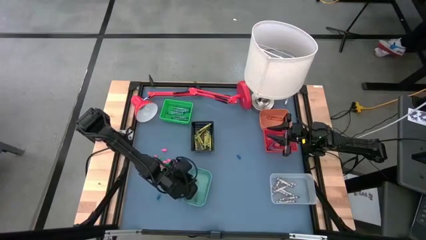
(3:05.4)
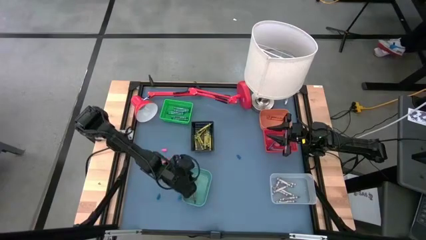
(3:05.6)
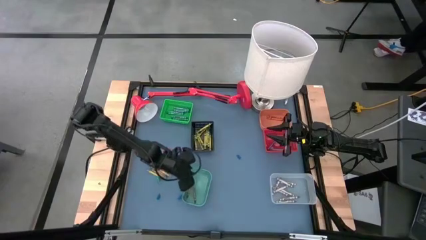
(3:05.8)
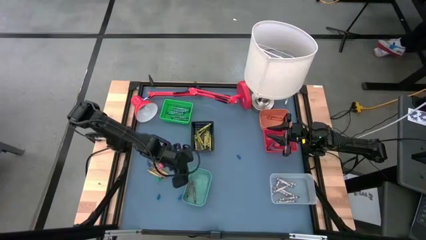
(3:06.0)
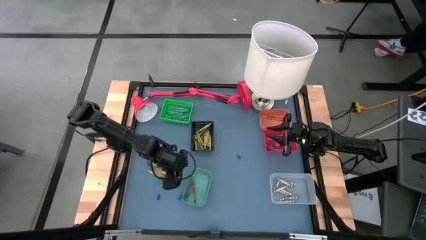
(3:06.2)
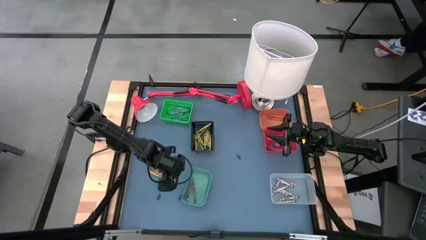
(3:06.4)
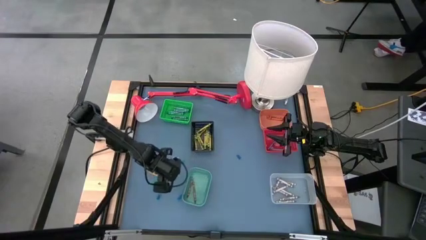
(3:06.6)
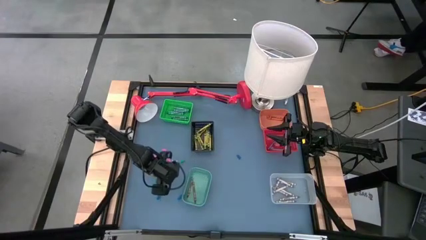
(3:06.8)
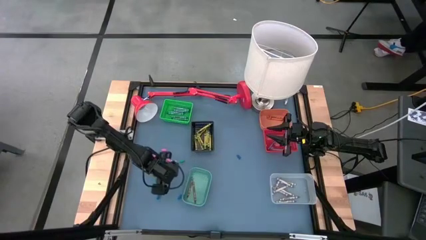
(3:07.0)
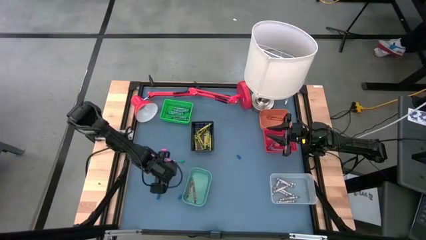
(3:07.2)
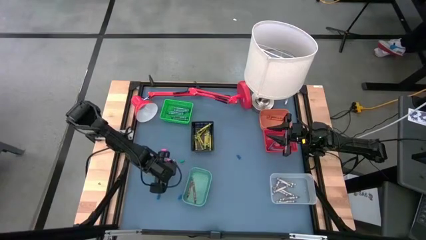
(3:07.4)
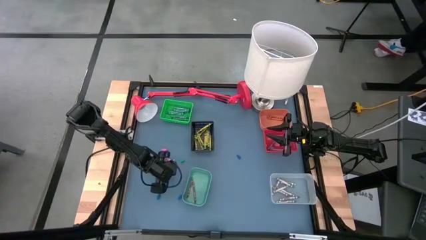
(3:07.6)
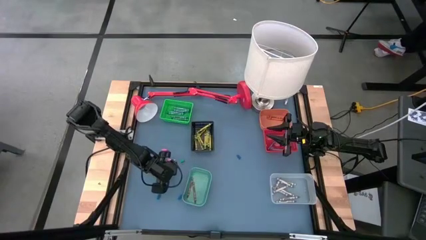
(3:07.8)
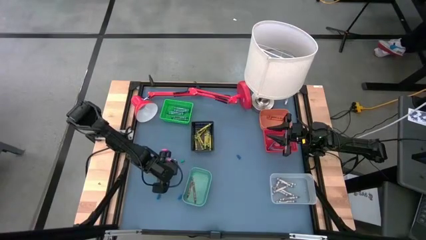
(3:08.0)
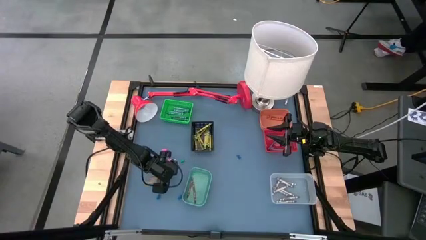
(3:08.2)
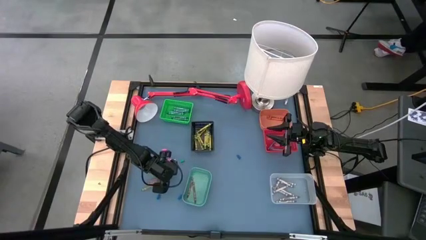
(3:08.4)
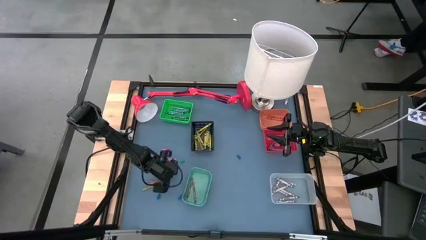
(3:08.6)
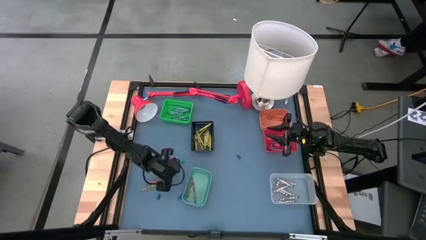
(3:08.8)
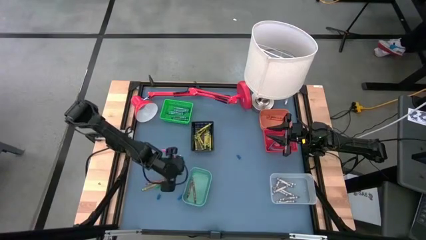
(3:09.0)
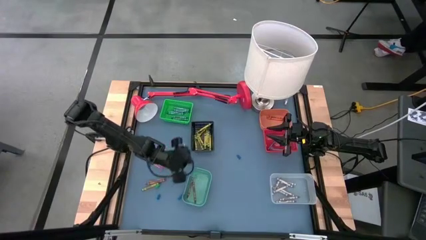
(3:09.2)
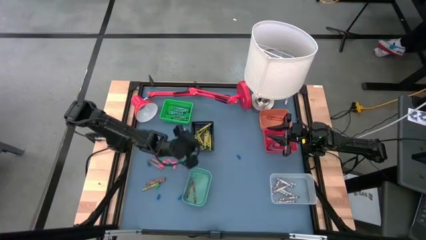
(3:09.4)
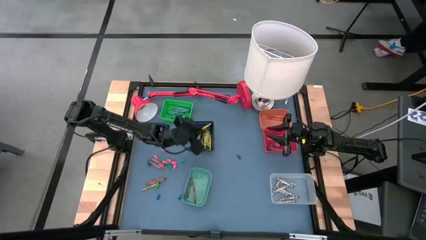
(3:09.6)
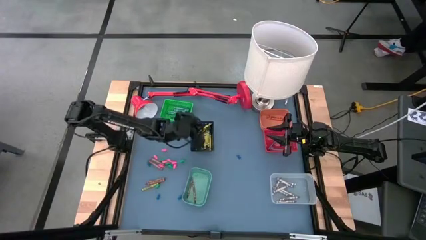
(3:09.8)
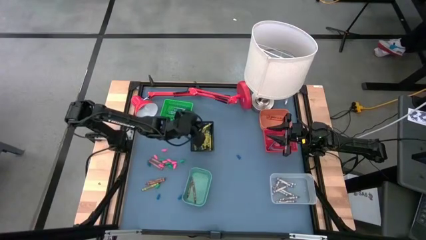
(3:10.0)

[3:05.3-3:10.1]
Task: Sort crayons
Put the green crayon into the black bin

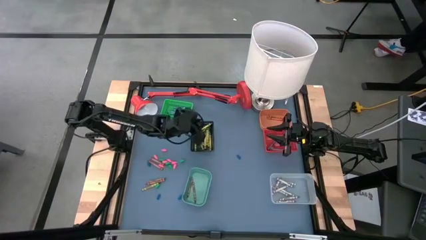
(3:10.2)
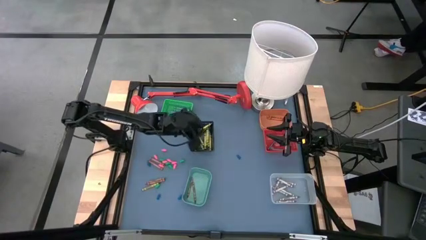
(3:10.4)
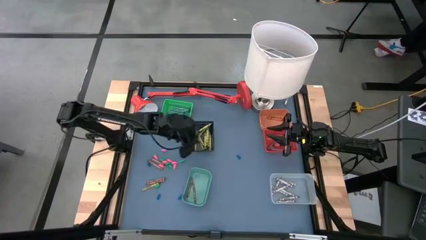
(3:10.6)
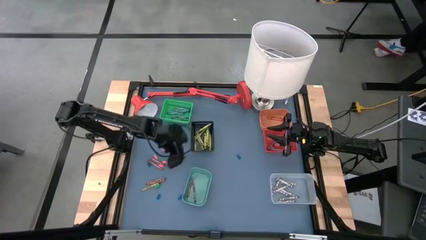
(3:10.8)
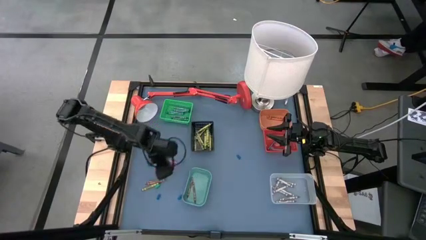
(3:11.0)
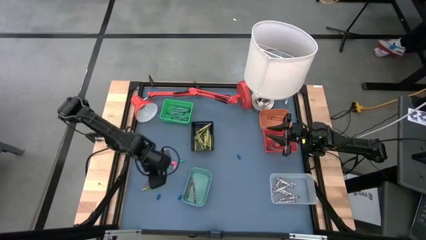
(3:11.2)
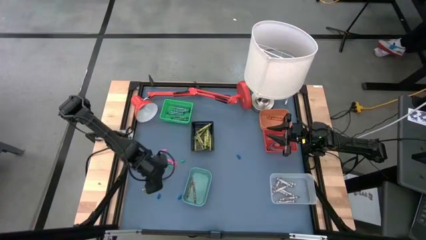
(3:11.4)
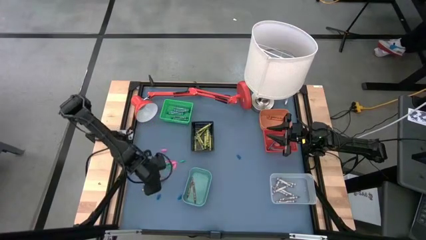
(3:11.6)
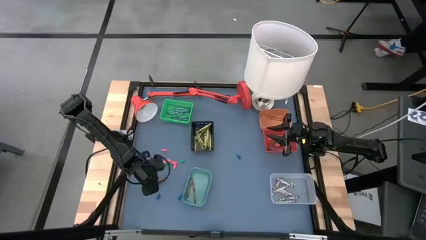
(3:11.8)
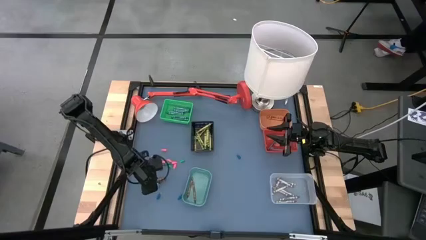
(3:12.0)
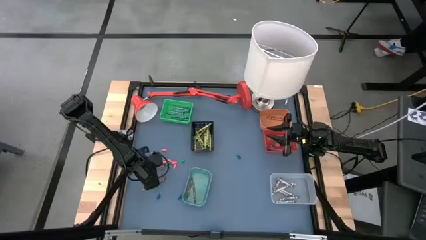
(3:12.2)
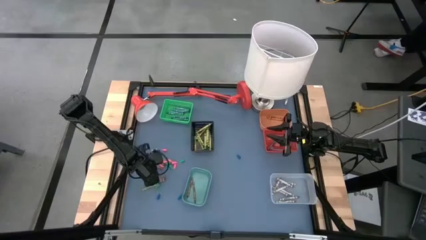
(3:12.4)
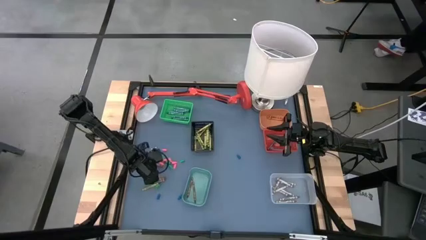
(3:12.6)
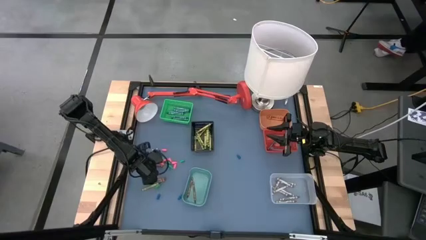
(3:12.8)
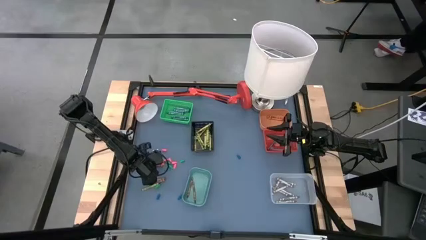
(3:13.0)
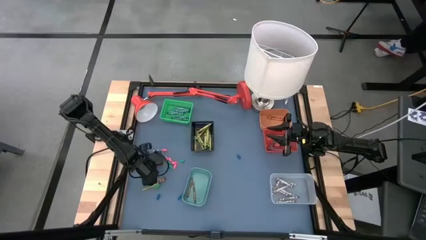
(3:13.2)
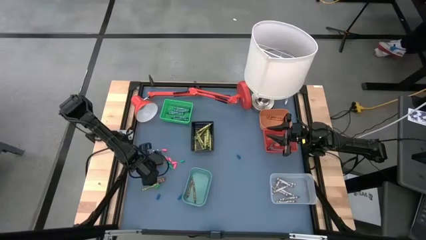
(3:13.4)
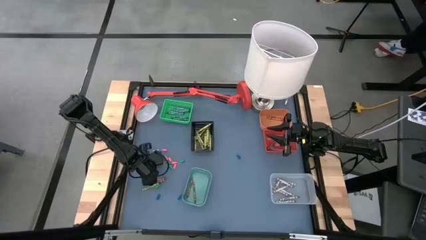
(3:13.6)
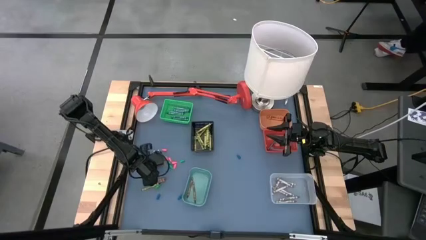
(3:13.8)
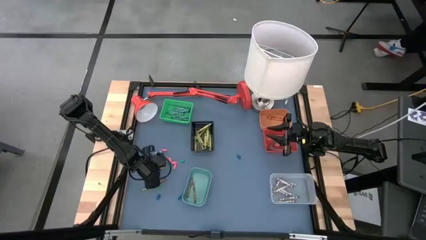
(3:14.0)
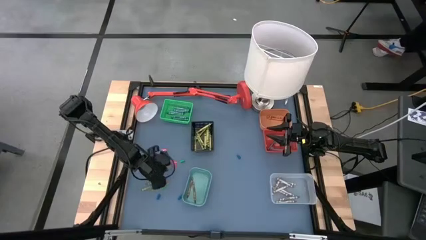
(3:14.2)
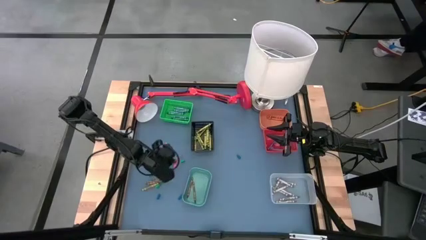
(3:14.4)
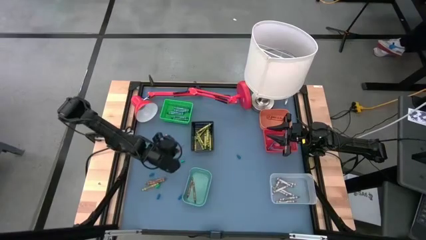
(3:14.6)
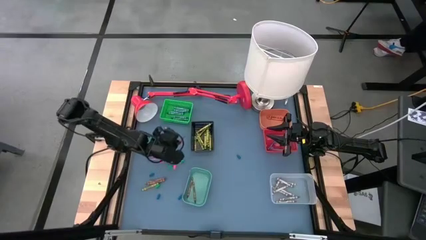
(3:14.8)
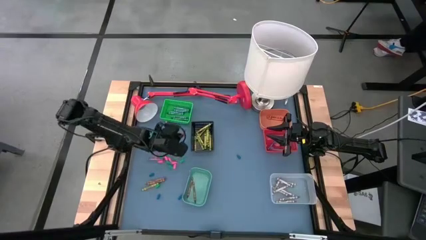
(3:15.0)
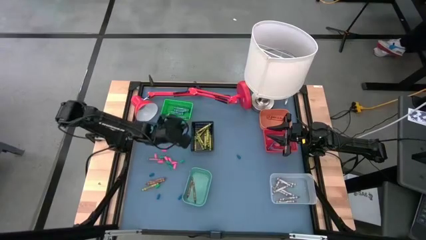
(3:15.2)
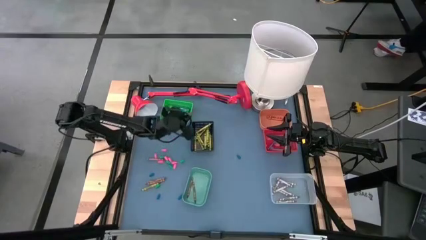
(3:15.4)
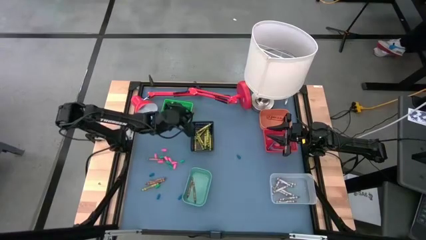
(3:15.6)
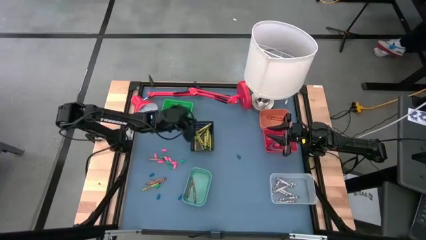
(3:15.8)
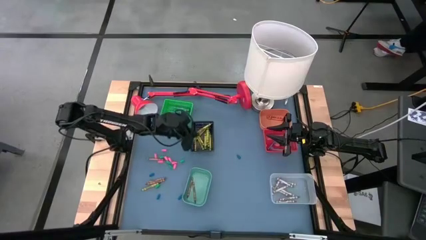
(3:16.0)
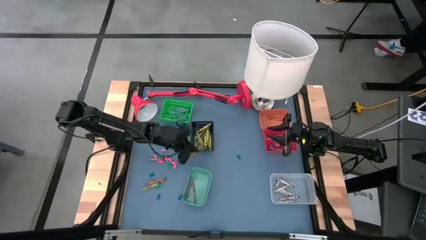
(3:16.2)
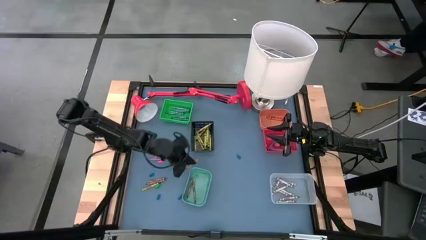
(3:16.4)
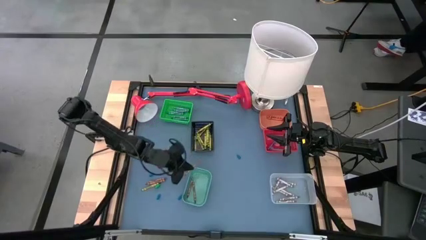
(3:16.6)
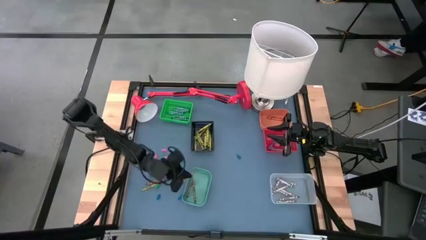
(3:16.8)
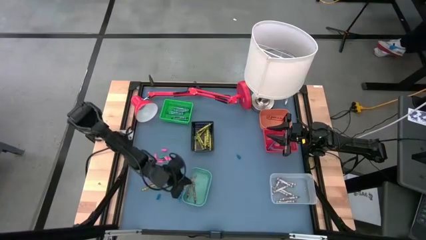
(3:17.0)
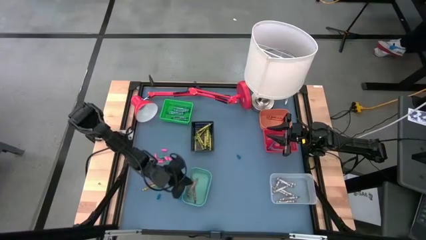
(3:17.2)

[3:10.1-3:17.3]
Put the brown crayon into the light green bin

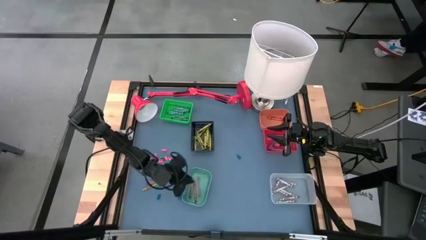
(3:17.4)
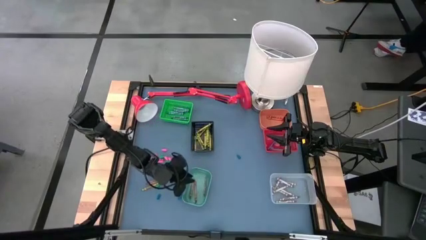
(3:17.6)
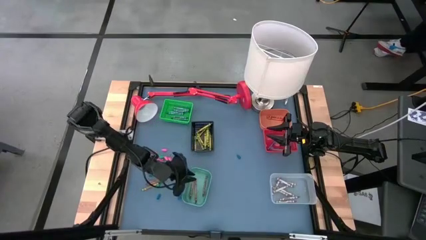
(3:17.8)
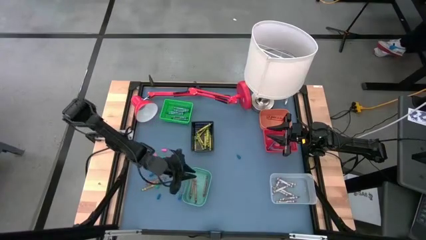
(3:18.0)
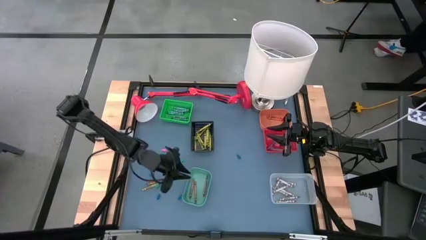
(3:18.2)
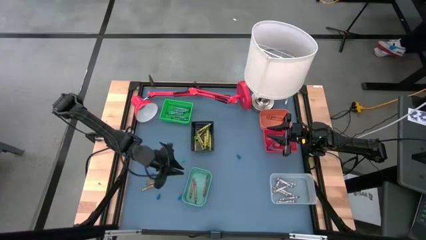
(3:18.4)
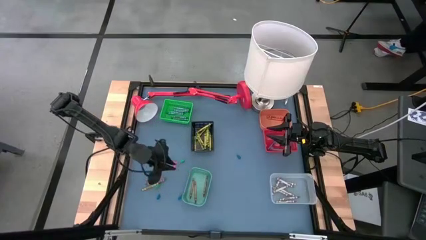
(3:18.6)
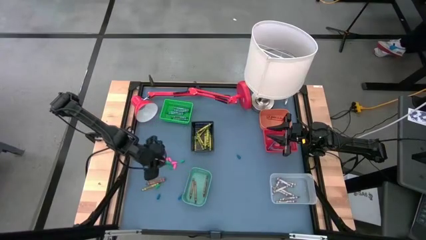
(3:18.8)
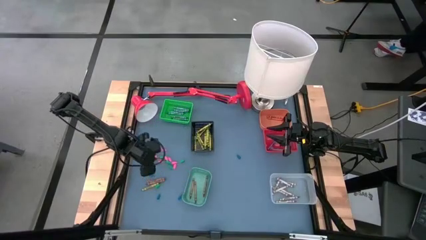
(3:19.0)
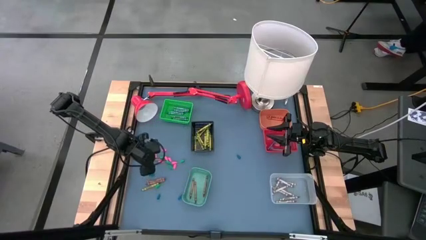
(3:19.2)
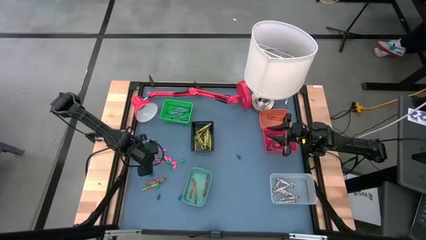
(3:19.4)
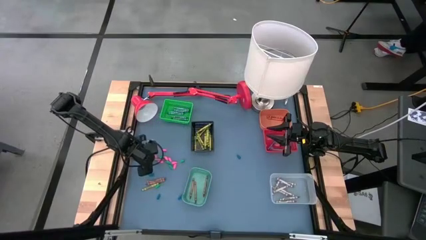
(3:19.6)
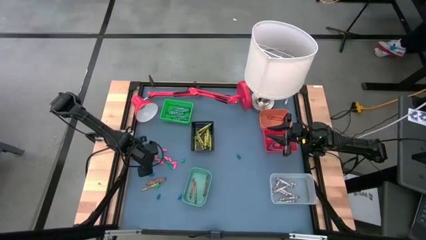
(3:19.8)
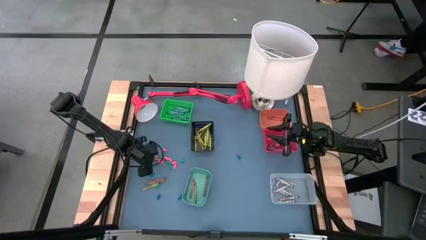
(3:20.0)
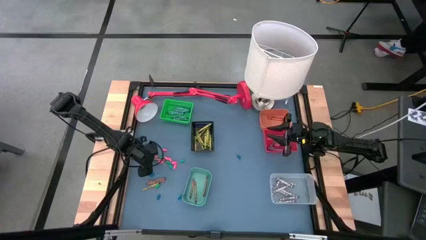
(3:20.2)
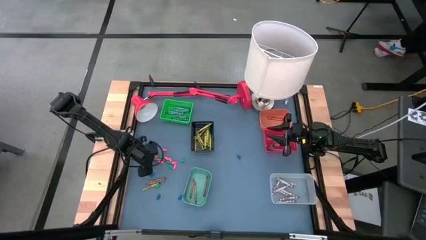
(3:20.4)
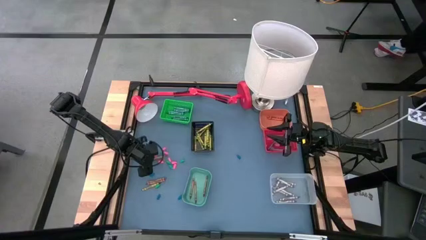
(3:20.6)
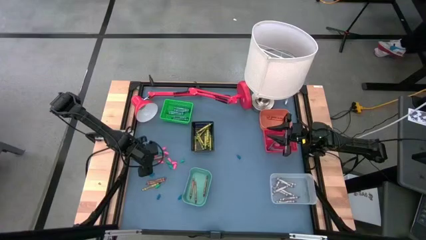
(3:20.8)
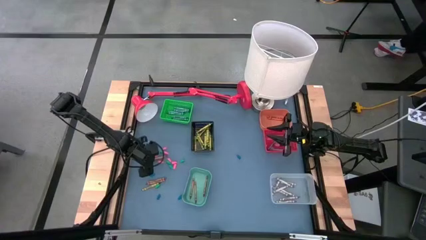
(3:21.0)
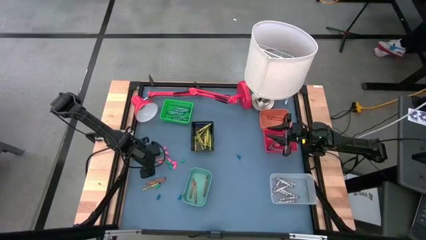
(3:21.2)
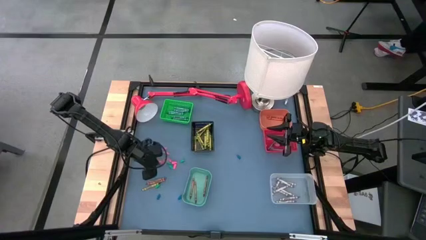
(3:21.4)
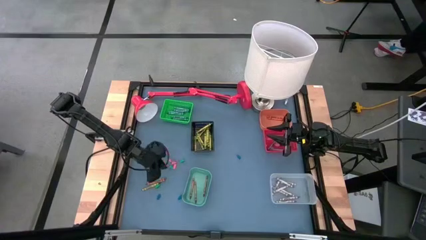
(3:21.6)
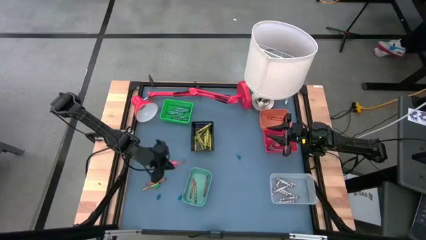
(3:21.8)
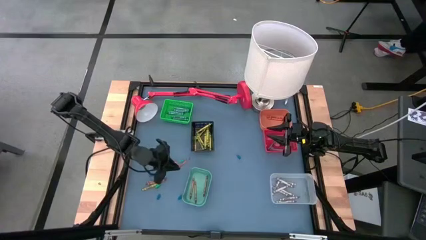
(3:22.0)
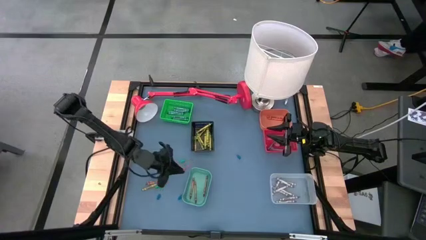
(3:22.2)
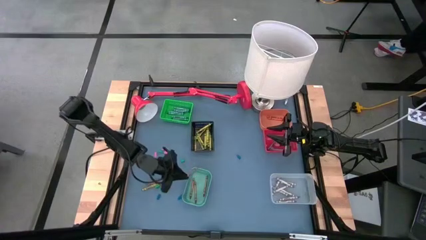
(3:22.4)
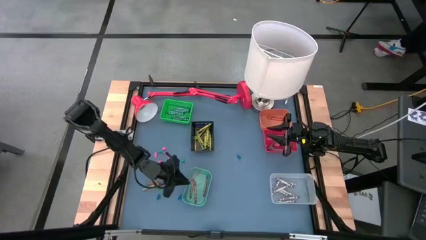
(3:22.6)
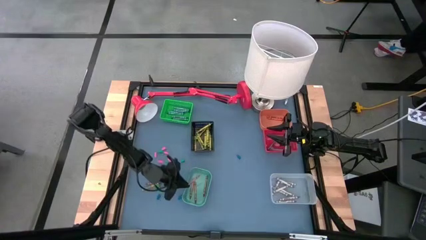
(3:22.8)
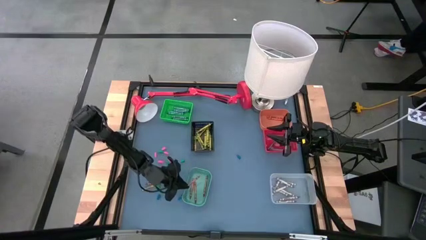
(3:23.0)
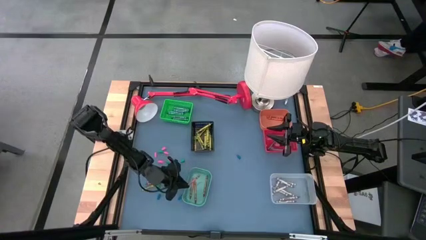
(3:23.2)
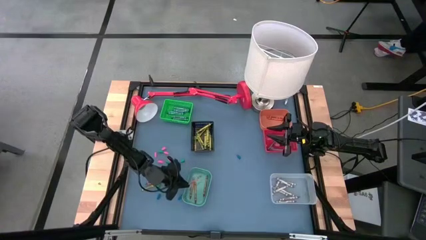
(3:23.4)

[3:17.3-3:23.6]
Put the brown crayon into the light green bin
